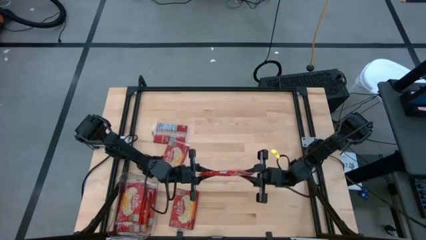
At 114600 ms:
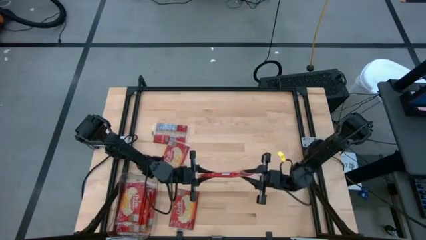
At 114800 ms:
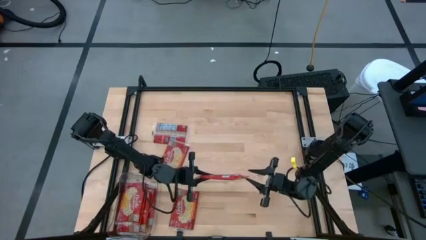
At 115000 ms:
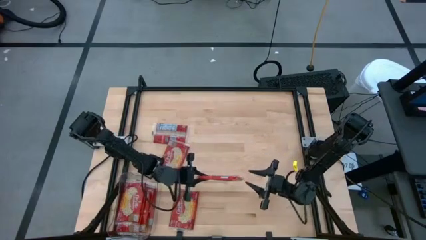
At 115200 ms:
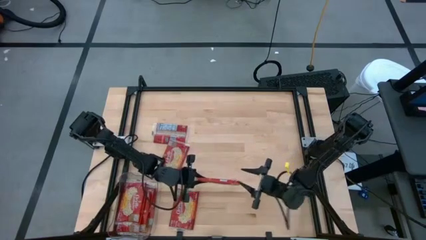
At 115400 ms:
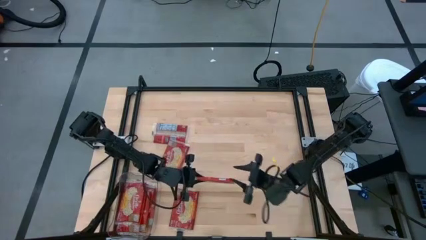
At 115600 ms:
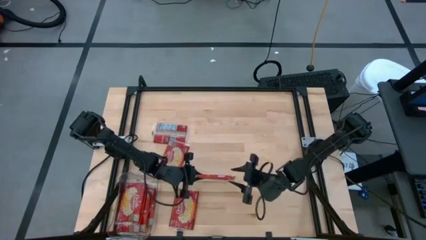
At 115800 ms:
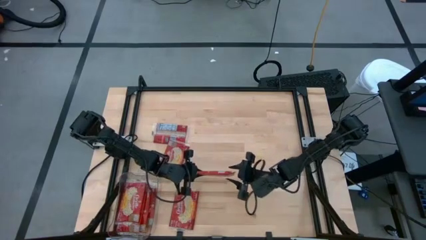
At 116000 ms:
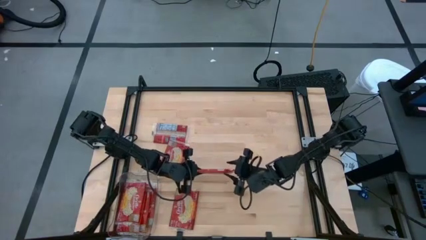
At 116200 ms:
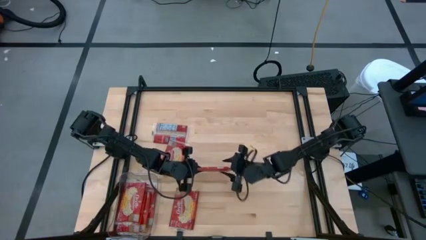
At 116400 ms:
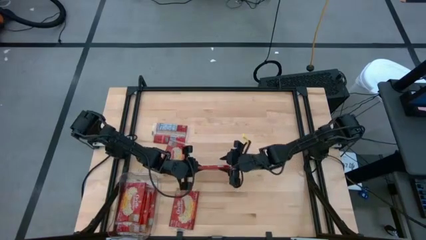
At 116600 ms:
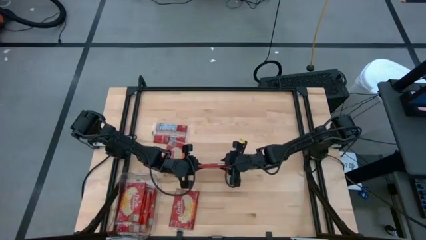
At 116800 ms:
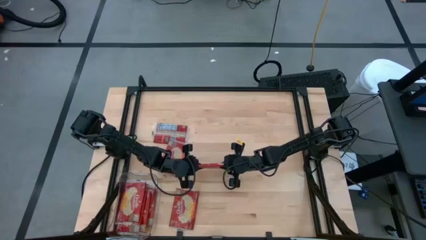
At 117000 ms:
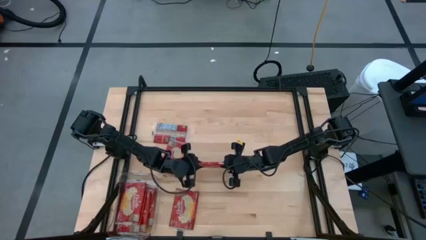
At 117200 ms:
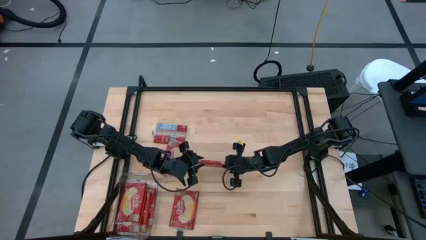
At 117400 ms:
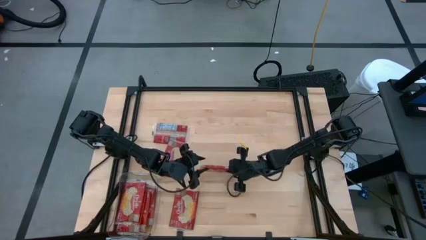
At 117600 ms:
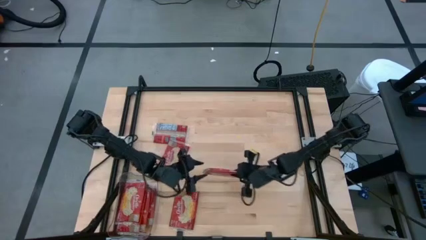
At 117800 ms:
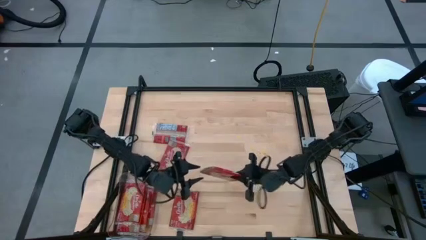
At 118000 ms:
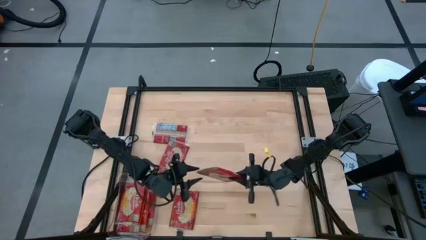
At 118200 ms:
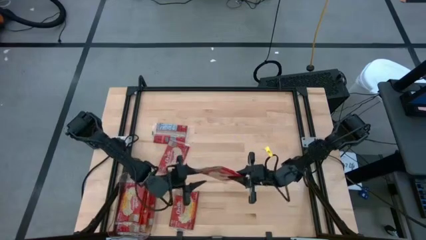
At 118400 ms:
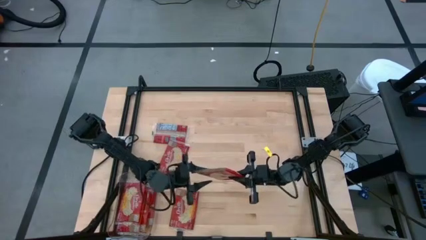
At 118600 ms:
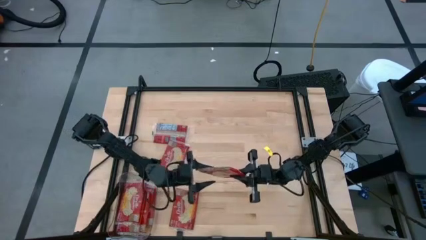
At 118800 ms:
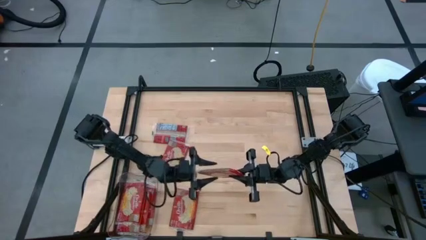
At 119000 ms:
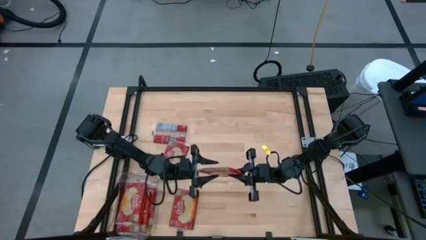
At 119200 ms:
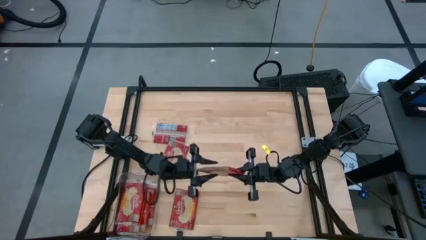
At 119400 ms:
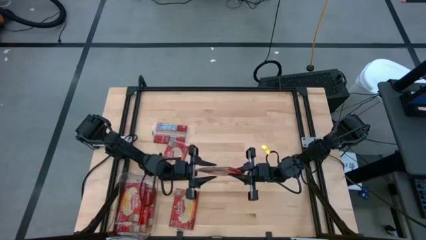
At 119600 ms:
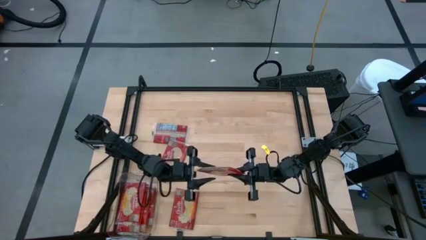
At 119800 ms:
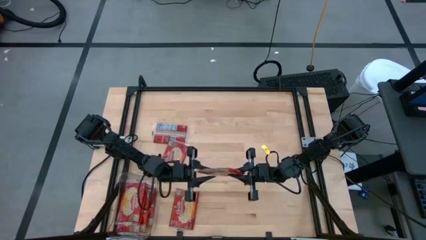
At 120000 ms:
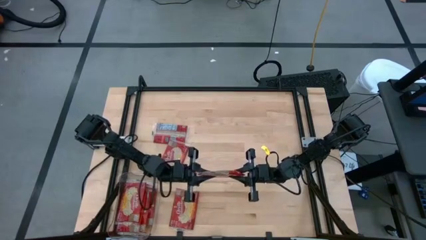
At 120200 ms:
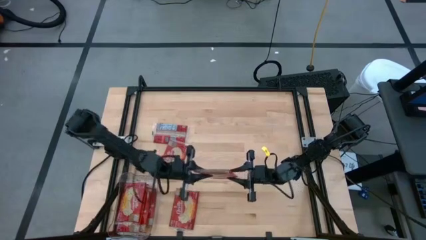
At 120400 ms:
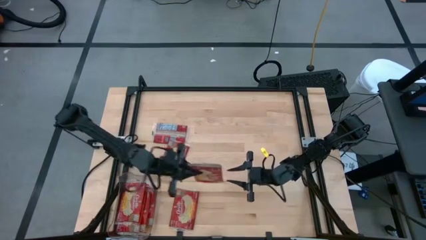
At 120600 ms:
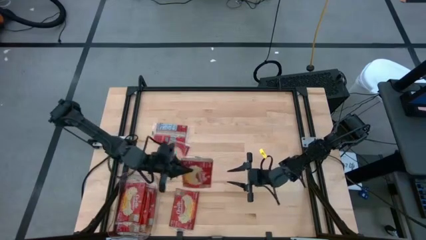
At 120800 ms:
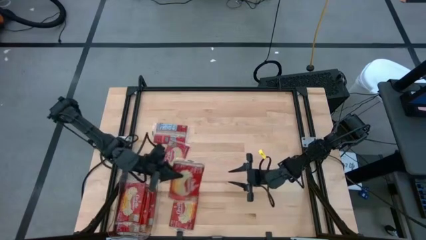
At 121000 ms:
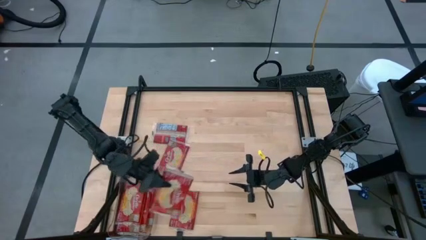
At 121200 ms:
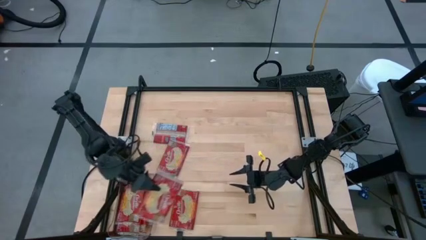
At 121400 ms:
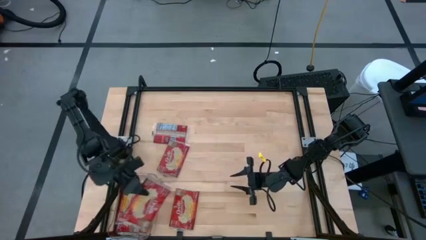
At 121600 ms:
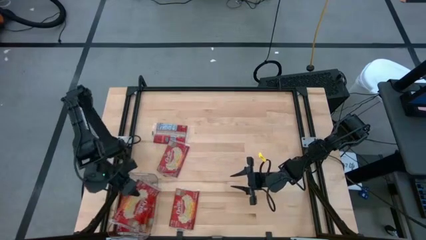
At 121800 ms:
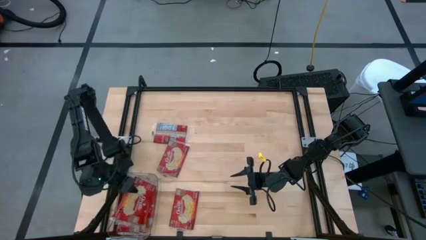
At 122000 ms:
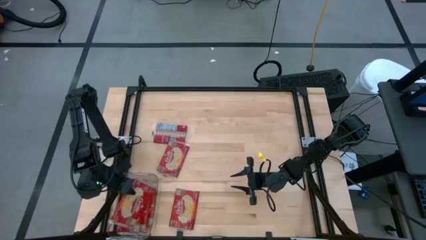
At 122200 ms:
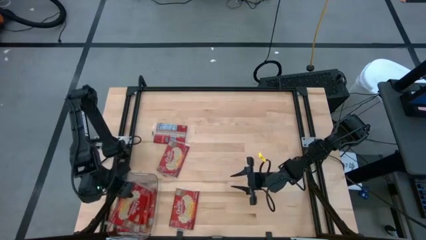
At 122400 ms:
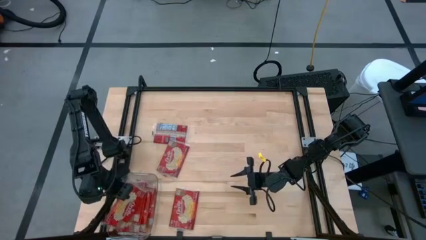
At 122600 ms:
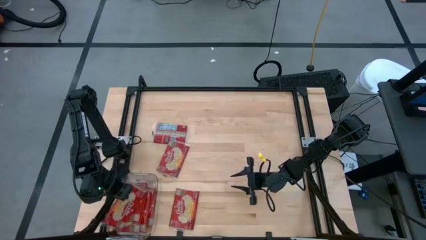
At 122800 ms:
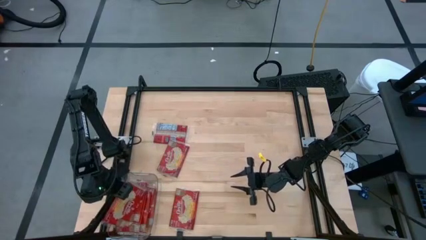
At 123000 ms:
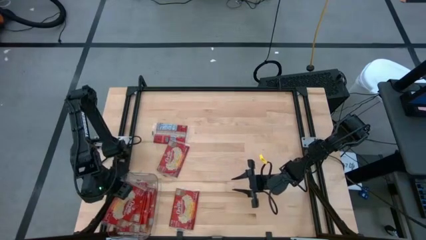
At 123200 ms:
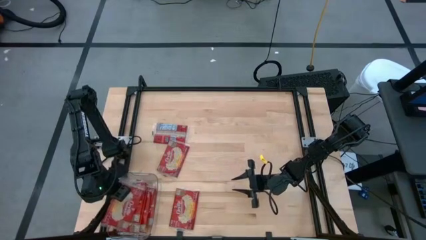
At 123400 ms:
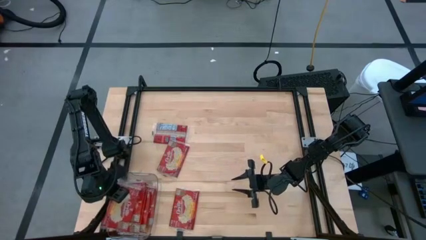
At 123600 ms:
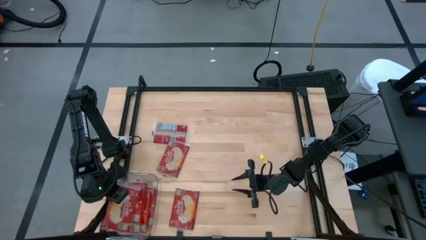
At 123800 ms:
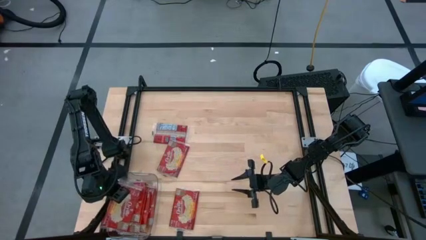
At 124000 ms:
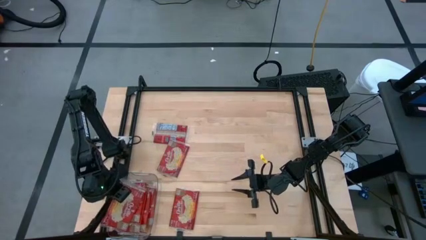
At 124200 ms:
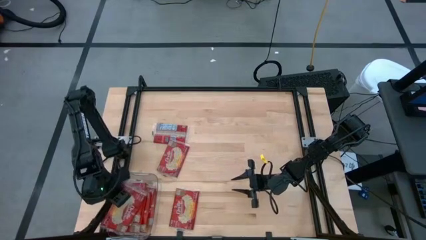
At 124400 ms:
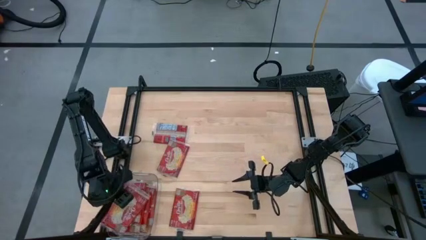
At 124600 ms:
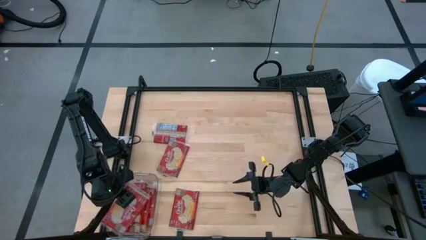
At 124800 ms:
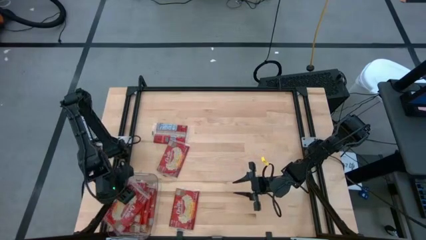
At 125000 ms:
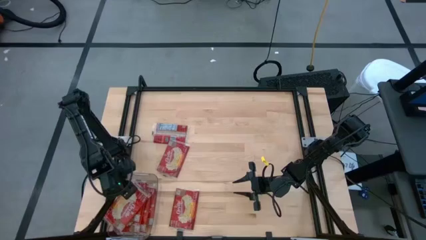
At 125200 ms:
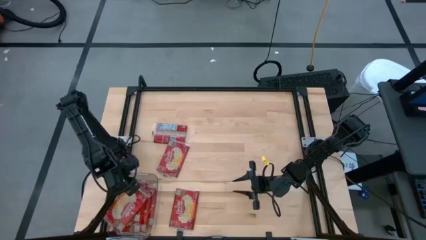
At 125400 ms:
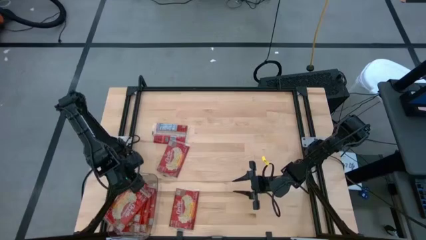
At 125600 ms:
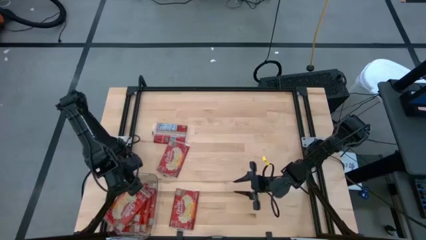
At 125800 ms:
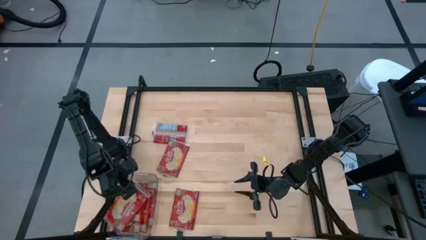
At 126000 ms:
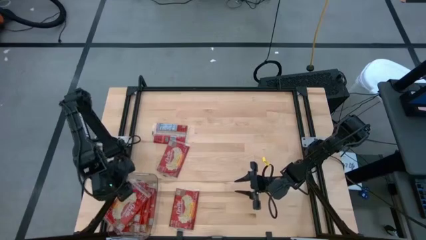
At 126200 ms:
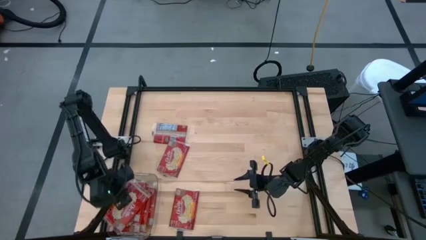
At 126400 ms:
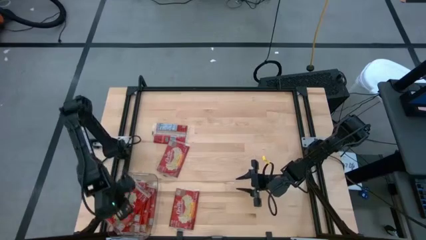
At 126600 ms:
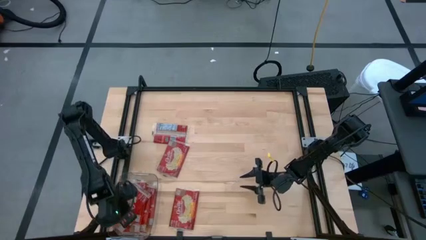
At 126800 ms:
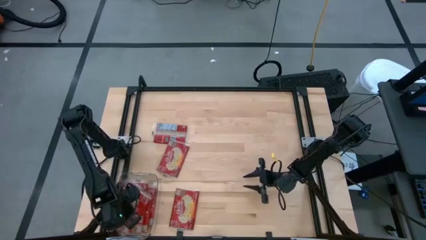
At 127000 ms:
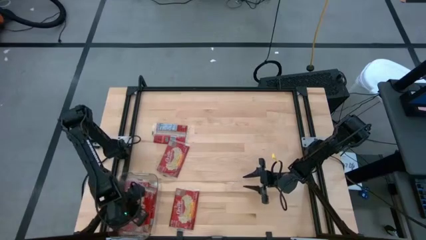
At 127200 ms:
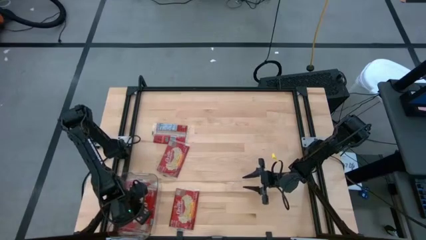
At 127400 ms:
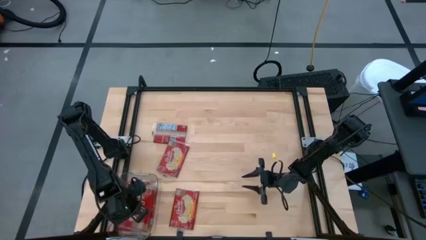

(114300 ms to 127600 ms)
Task: Sort popcorn bags into baskets
Put the popcorn bag into the transparent bin
